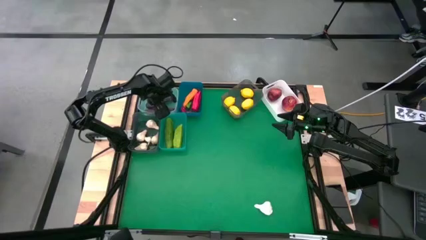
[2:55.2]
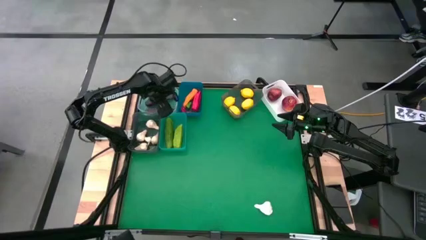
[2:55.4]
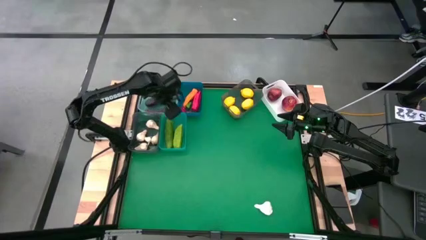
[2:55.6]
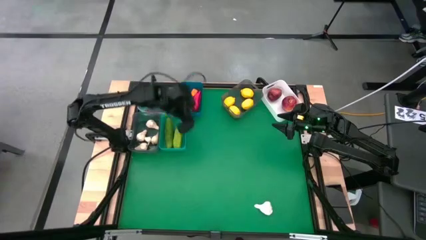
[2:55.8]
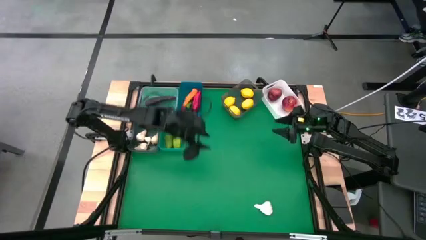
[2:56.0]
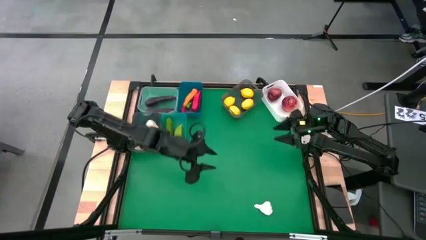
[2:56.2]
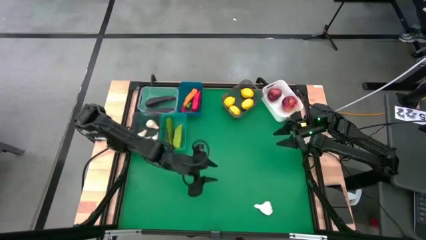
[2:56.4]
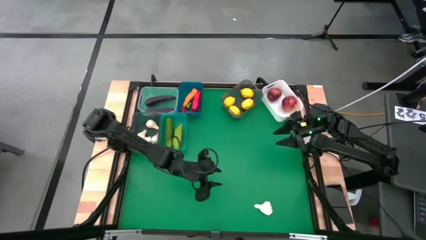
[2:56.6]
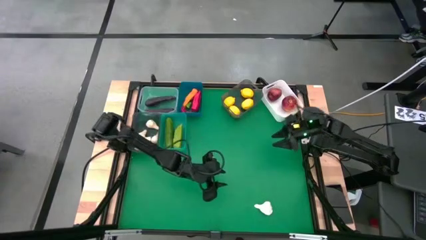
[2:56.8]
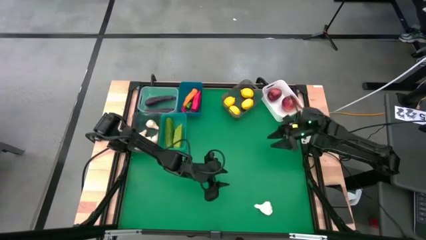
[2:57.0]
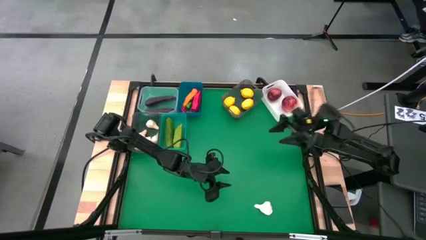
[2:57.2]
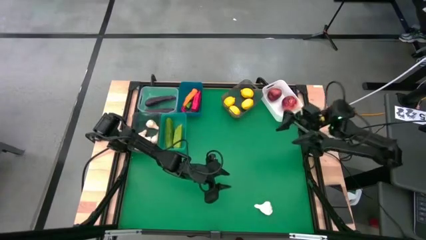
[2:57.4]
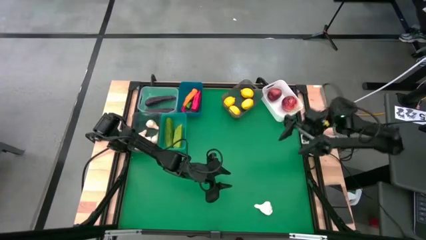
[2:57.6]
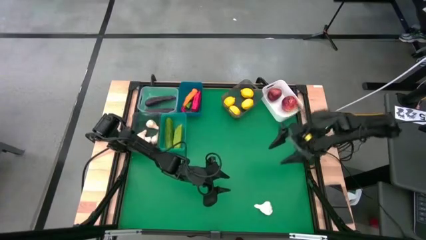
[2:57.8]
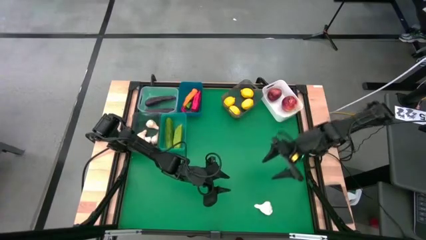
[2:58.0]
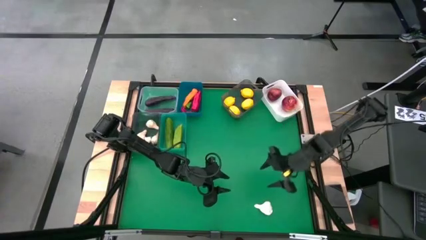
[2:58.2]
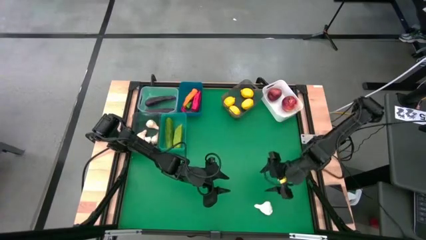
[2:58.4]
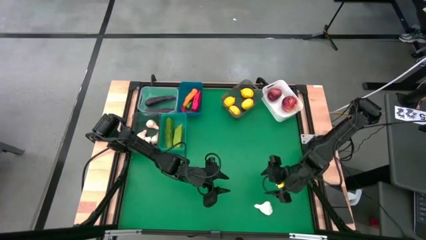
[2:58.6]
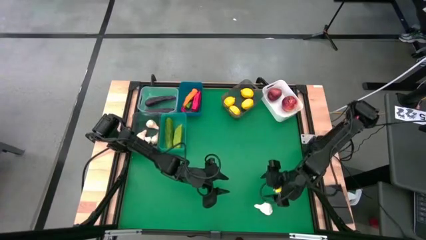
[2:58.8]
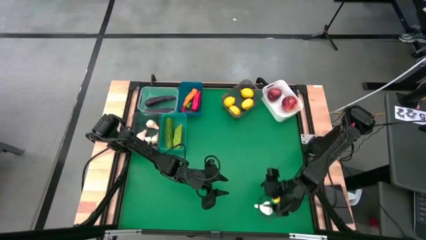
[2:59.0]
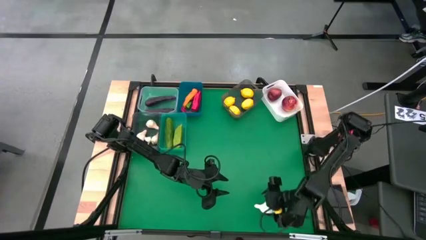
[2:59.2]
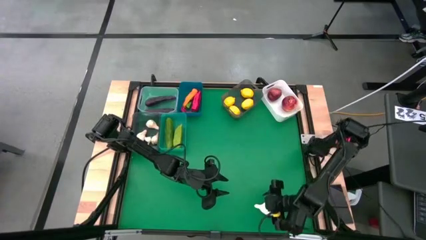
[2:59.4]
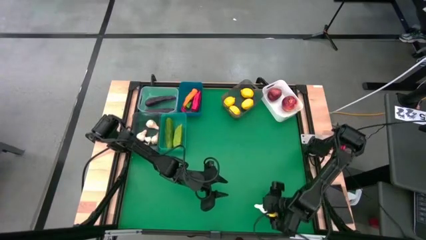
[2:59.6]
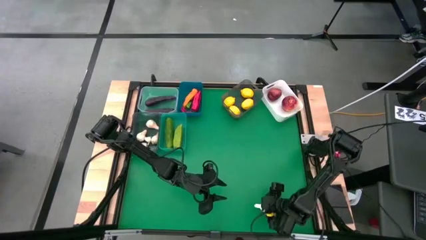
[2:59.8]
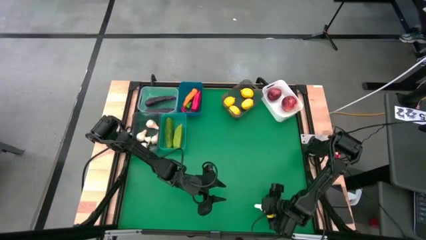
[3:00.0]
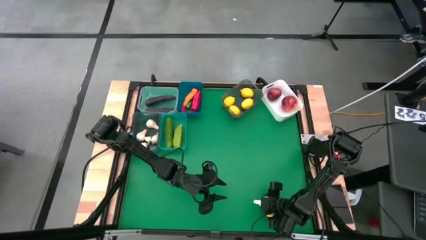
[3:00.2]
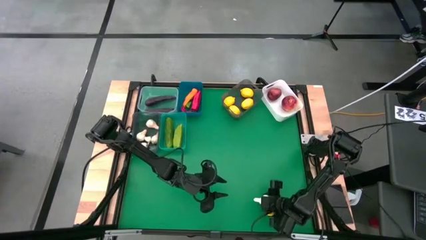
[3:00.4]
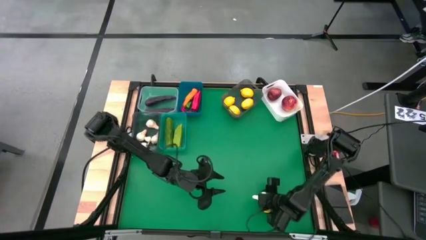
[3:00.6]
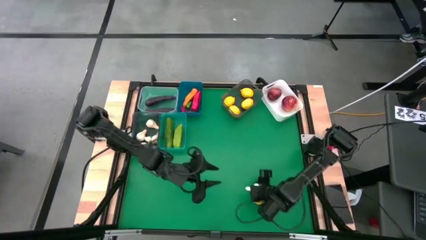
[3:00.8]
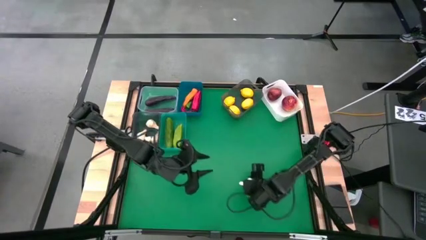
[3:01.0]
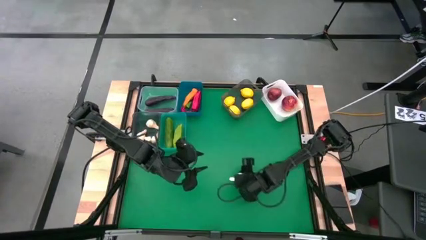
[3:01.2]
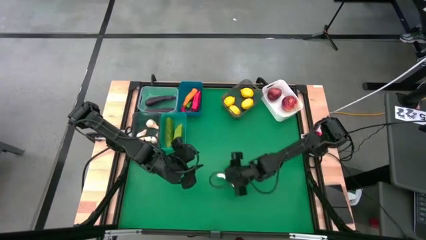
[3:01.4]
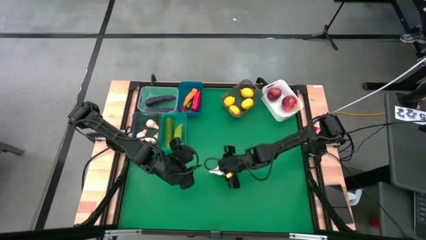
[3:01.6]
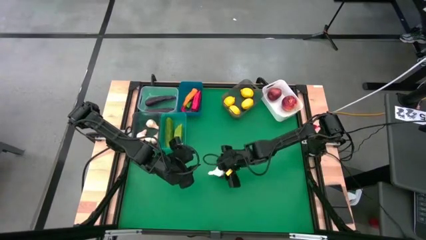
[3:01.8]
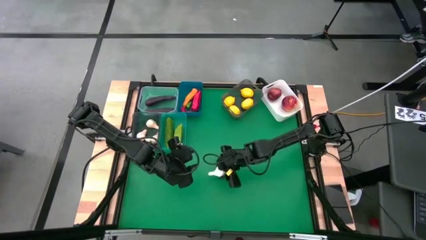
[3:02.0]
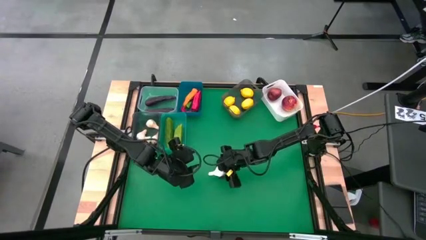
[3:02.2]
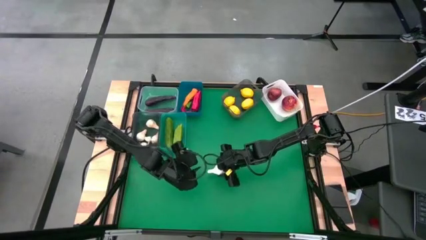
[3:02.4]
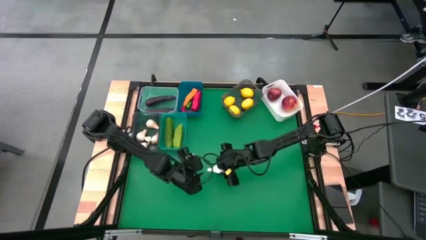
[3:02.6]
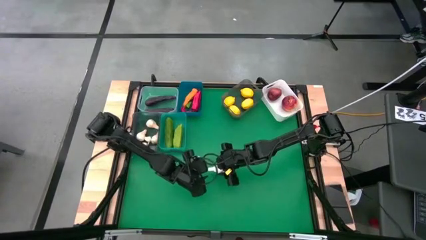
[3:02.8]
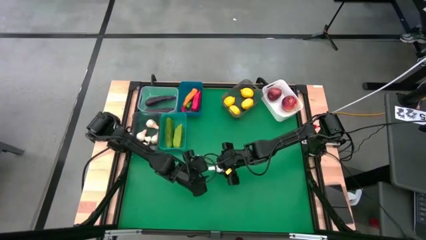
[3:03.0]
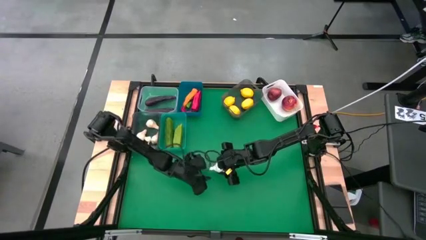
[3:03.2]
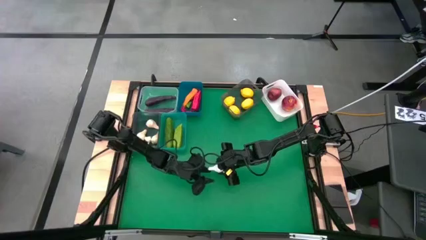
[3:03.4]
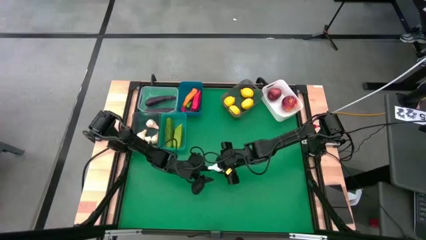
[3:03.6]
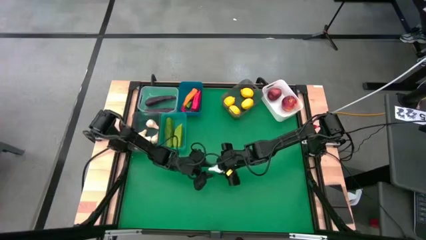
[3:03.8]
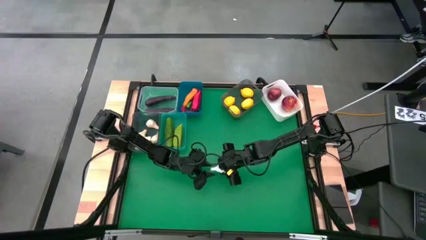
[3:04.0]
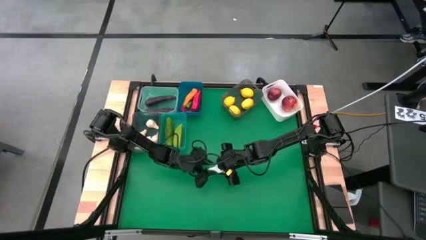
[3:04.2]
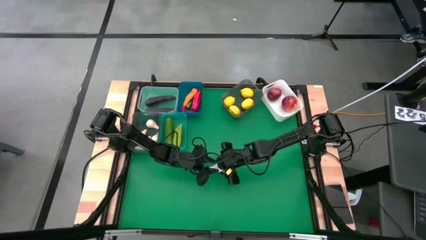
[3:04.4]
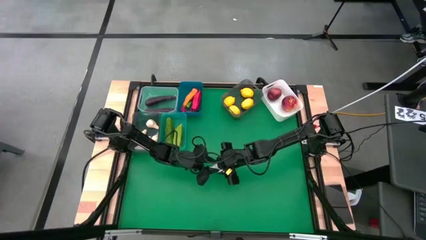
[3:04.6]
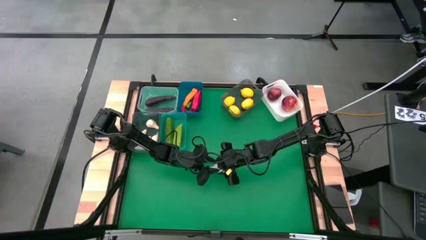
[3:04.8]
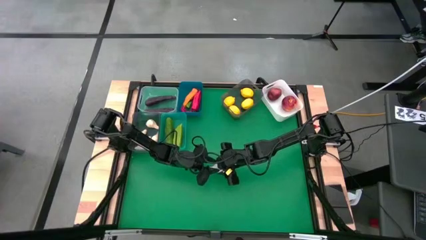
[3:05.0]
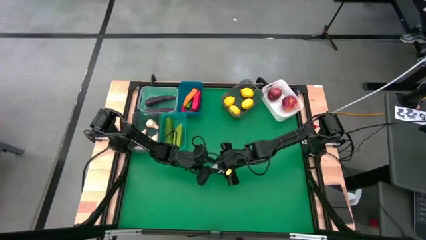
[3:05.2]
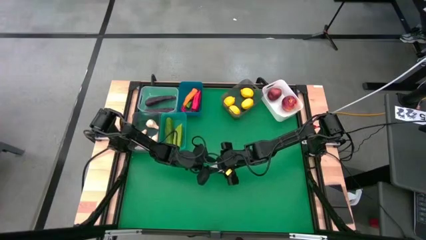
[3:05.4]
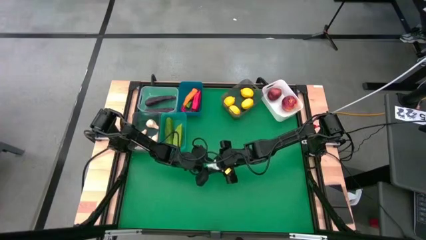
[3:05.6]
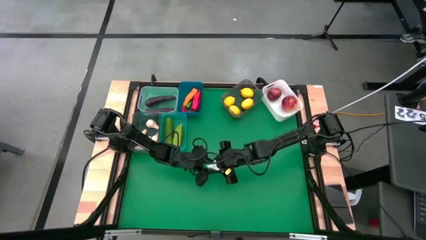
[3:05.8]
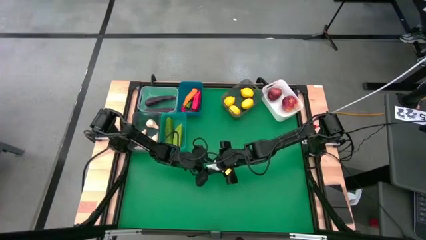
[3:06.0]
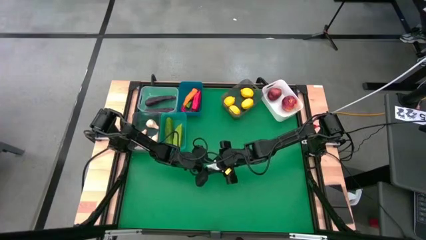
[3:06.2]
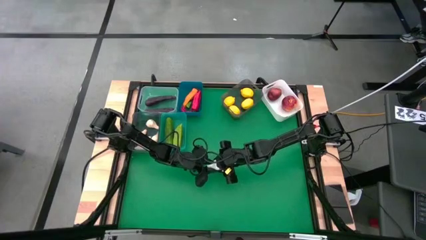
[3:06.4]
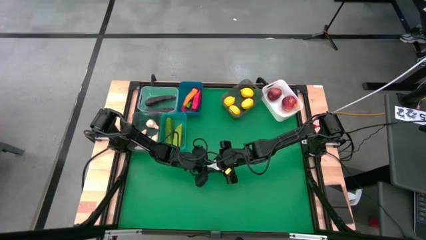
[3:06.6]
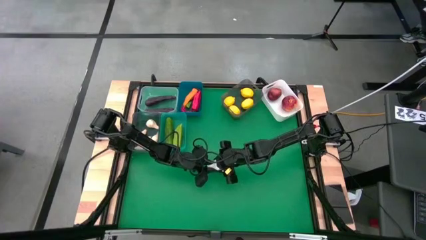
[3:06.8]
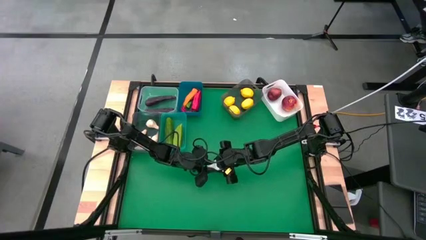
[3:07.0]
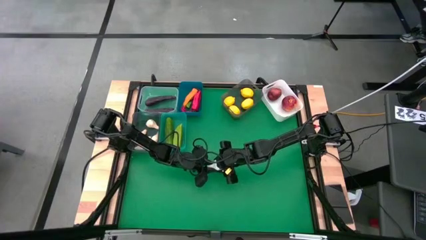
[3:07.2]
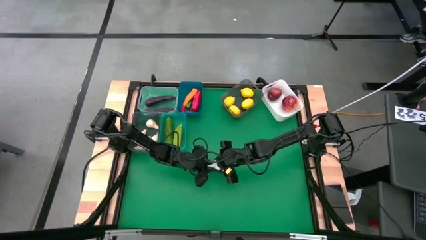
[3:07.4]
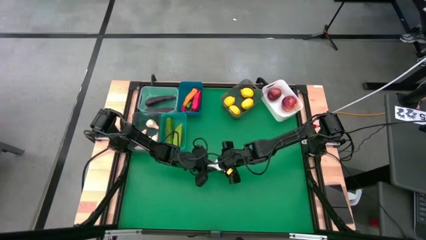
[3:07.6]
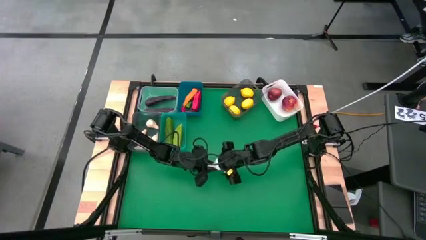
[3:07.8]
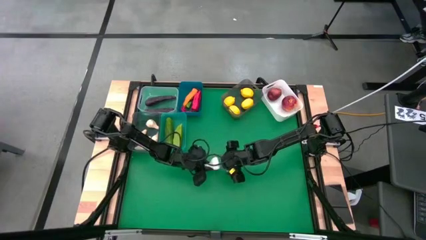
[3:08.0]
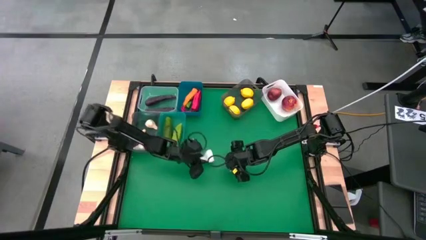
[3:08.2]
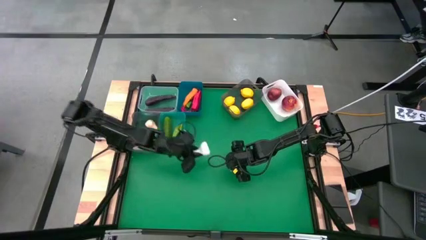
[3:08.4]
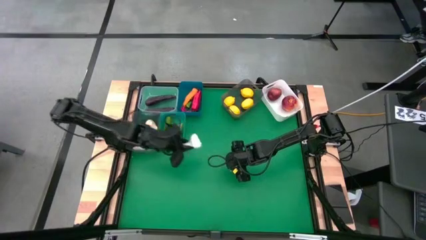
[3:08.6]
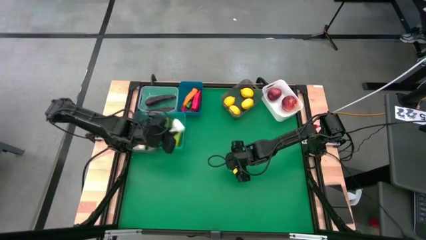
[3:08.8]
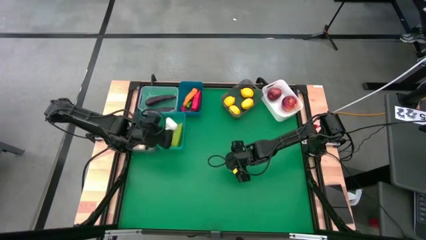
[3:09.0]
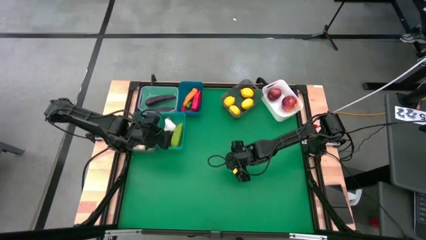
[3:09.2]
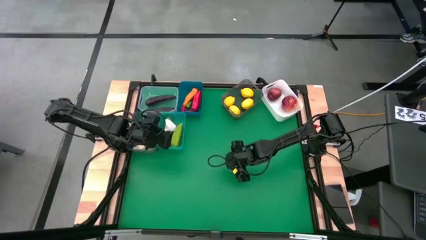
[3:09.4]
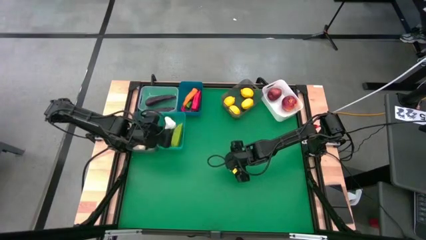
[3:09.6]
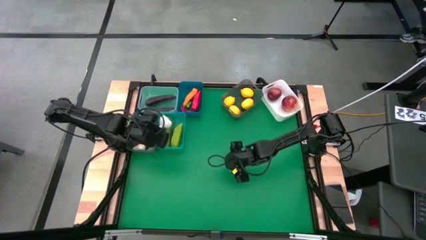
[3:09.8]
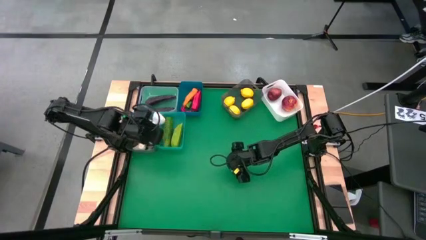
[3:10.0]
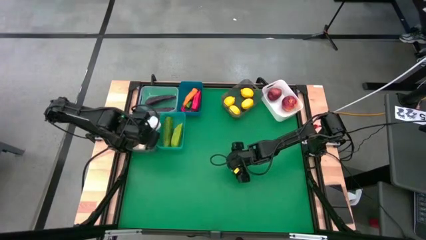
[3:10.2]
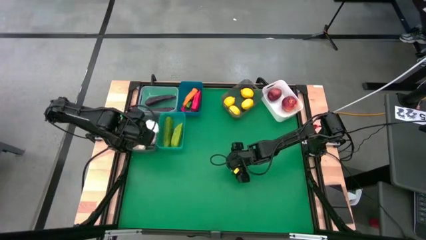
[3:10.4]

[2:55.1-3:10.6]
Task: Sort produce into baskets
Put the white garlic into the left black bin
